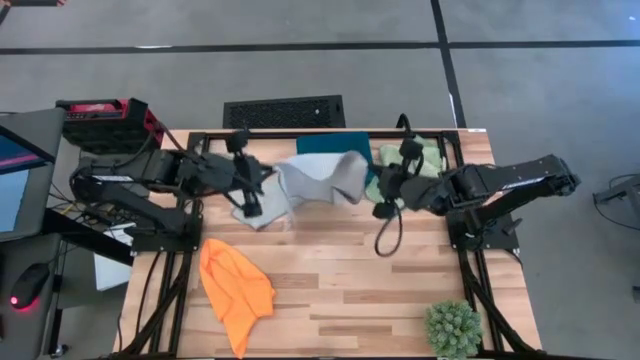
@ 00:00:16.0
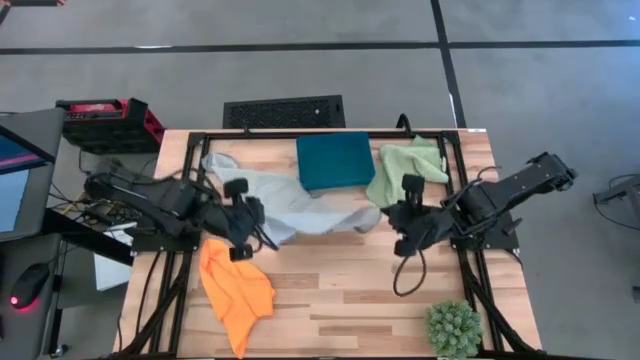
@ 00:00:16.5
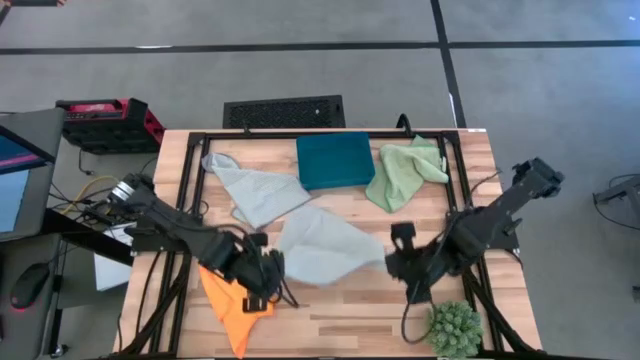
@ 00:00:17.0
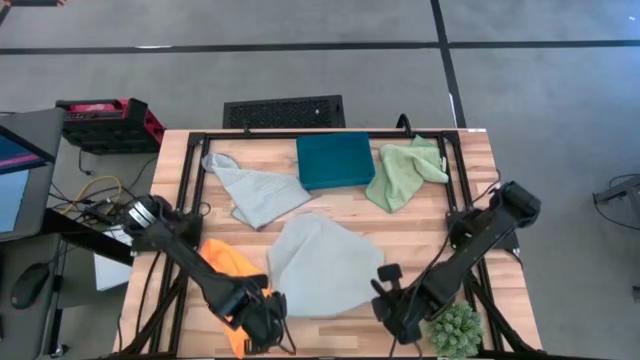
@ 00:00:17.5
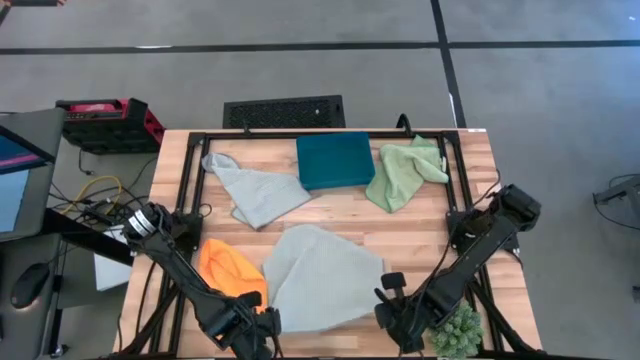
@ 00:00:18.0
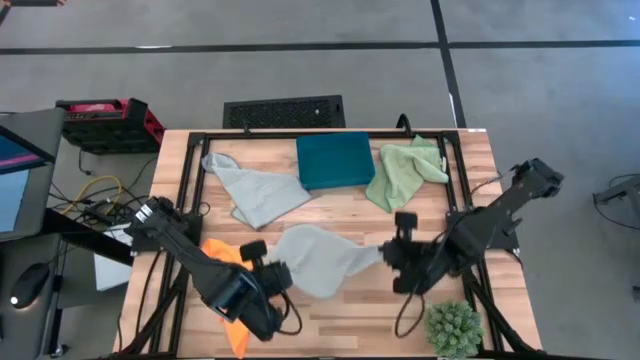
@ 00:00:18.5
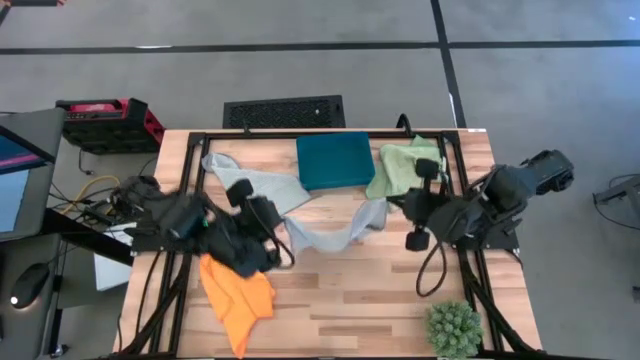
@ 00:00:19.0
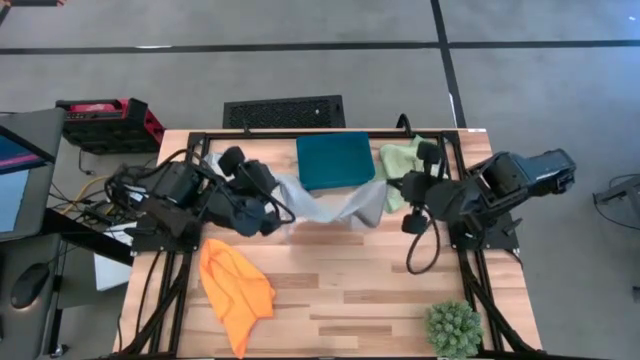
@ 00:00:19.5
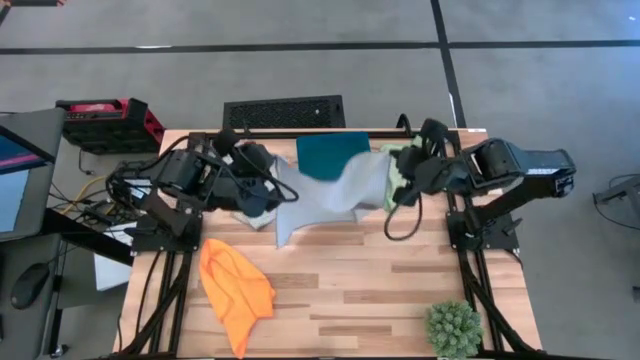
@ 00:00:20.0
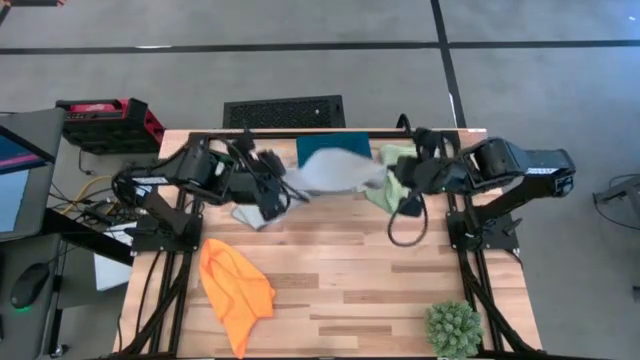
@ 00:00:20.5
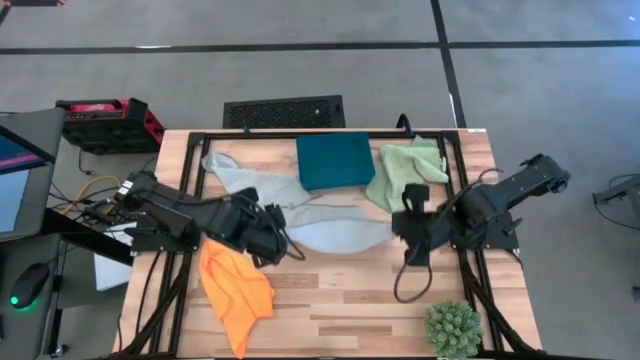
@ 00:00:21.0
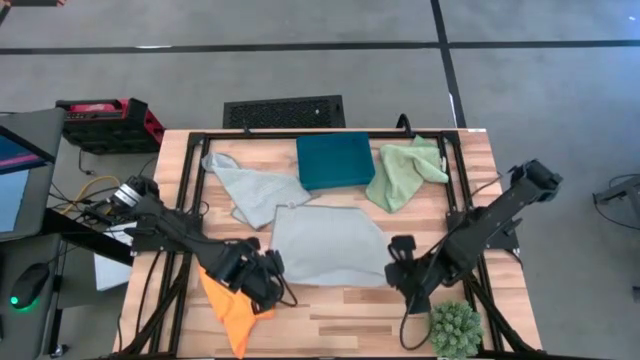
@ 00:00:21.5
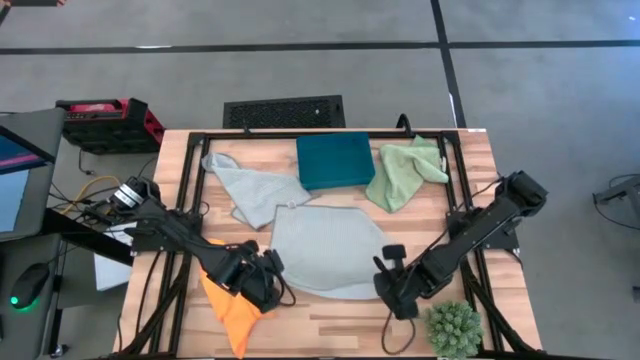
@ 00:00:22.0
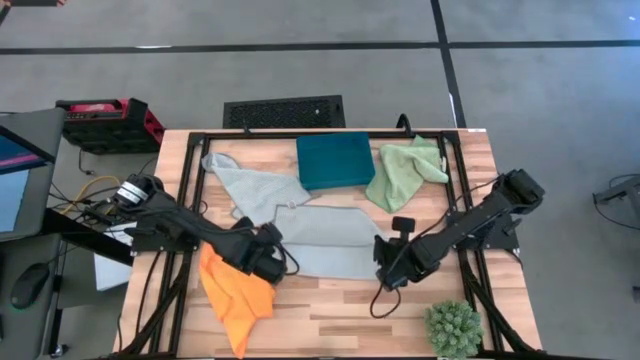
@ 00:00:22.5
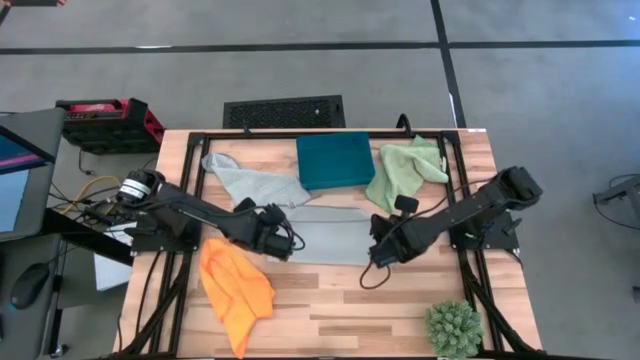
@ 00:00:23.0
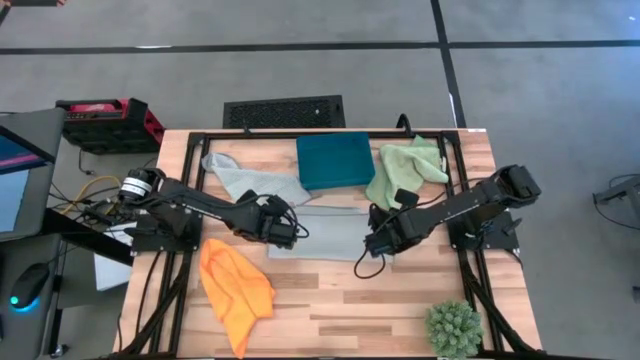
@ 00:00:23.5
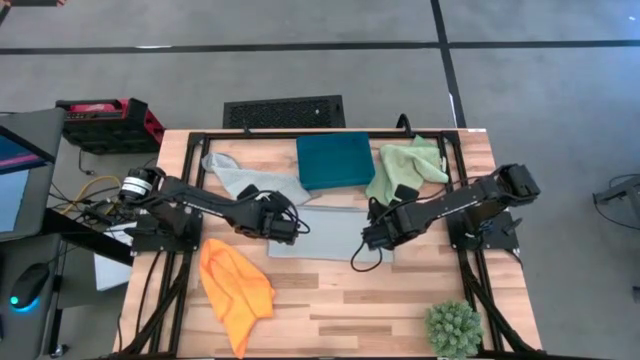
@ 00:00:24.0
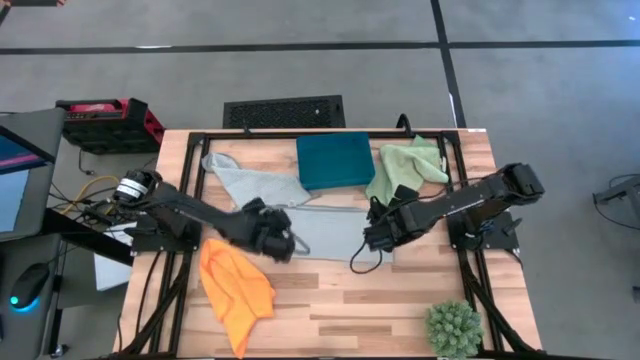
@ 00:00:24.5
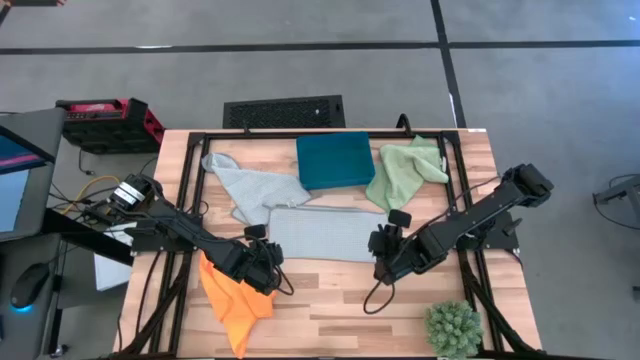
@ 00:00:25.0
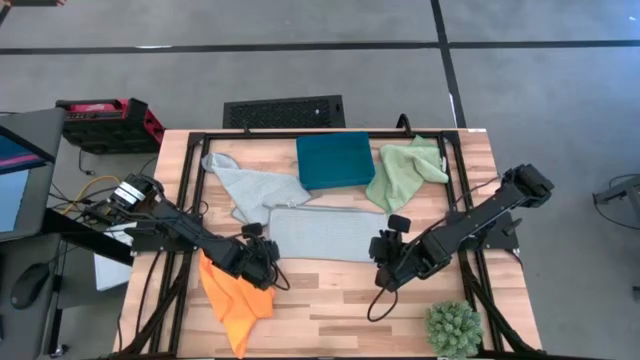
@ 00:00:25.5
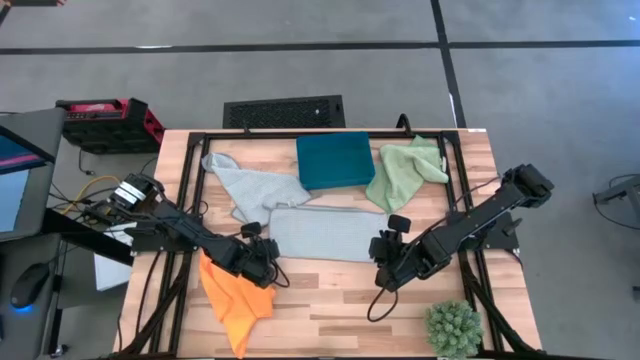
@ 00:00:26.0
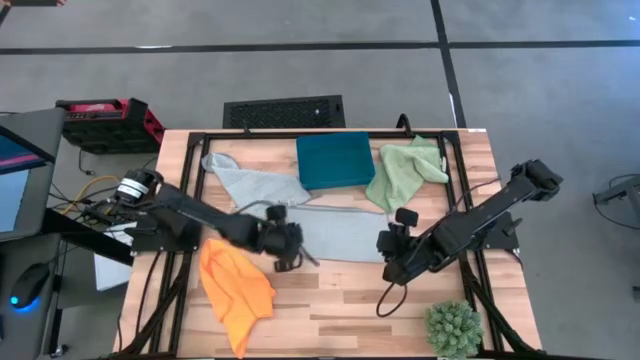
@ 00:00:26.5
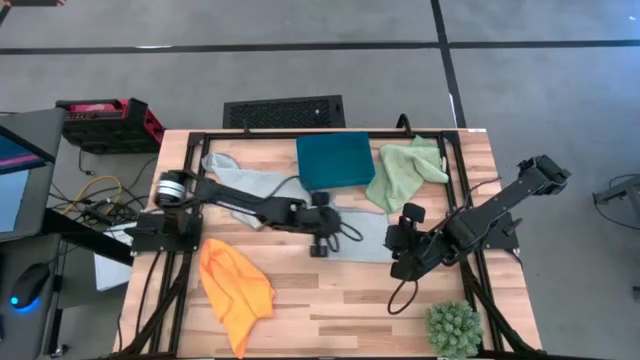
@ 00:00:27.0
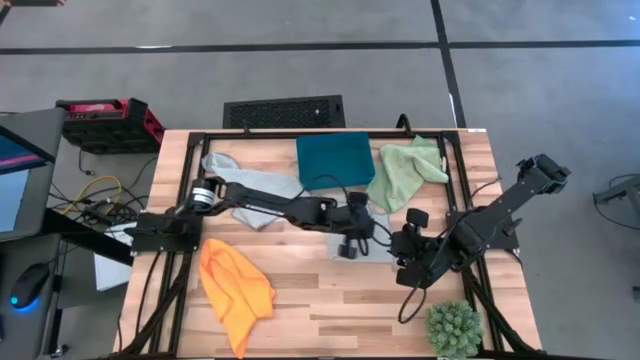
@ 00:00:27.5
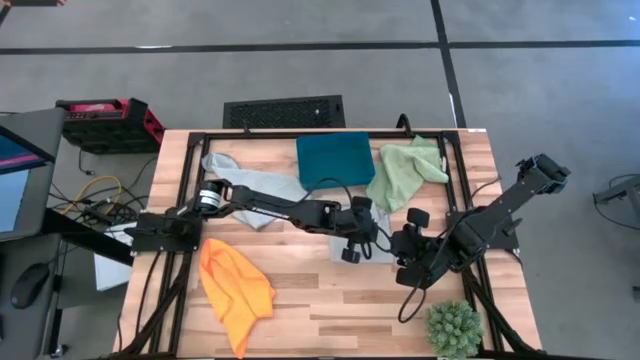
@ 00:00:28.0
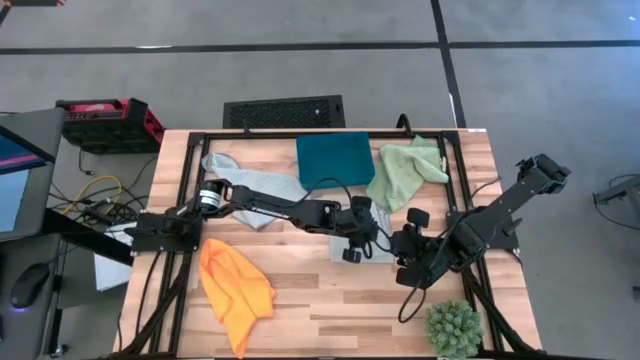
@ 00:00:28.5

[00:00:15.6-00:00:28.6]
Task: Fold microfiber towels
Fold the bottom left gray microfiber cloth

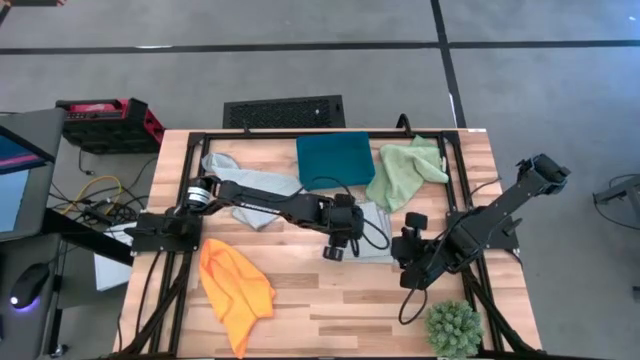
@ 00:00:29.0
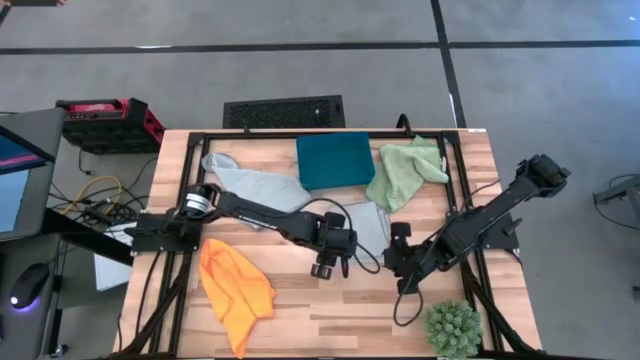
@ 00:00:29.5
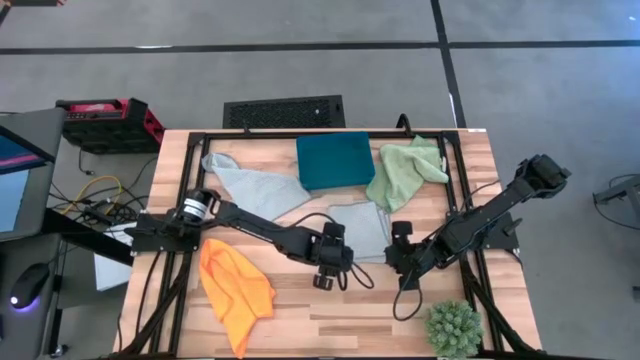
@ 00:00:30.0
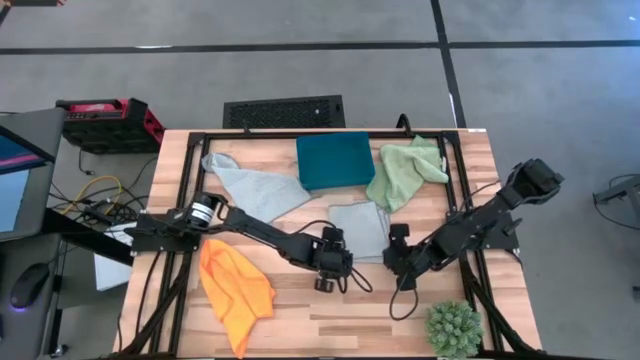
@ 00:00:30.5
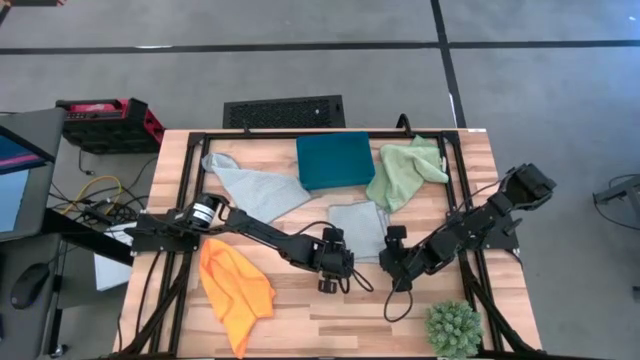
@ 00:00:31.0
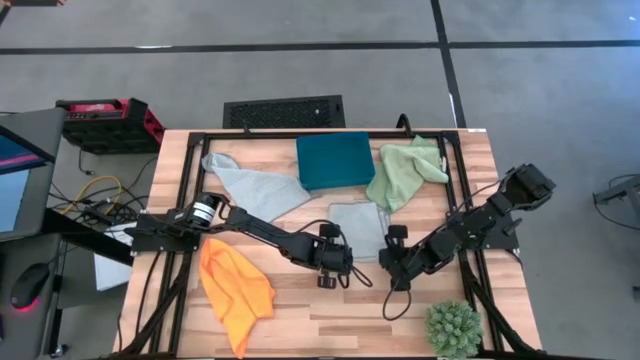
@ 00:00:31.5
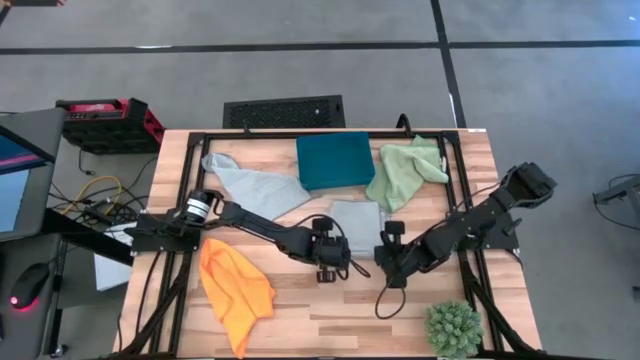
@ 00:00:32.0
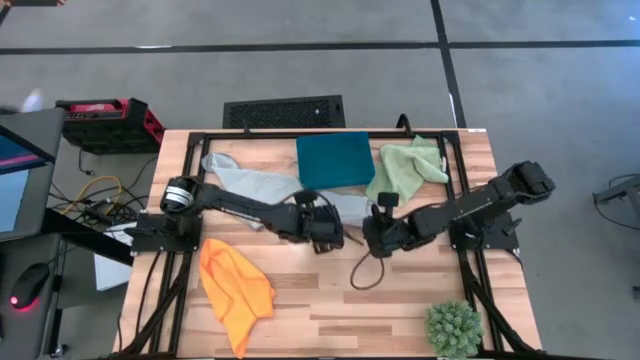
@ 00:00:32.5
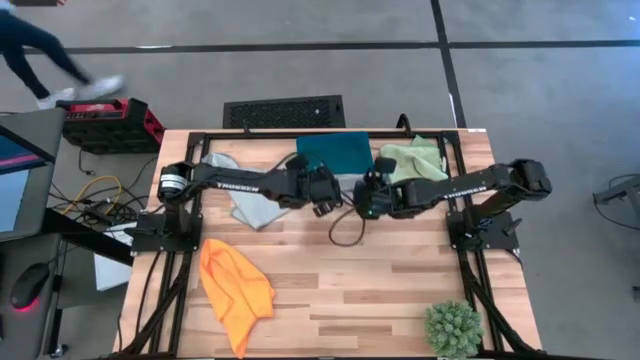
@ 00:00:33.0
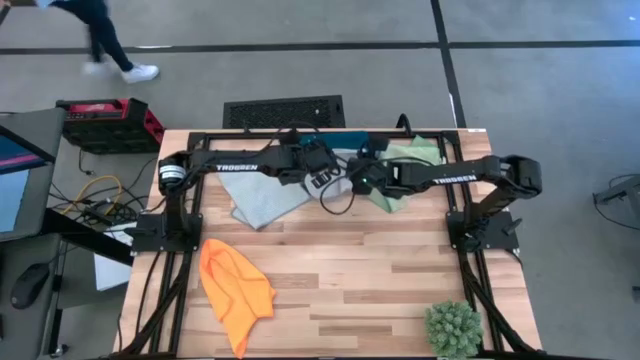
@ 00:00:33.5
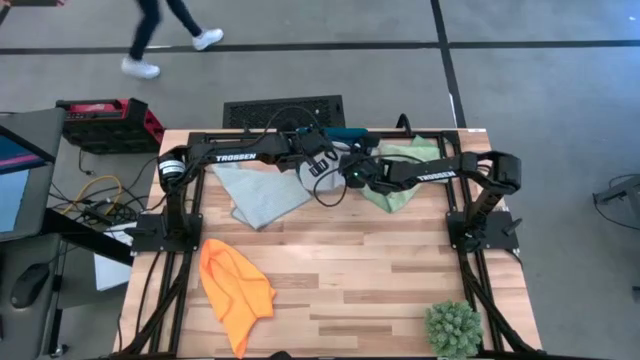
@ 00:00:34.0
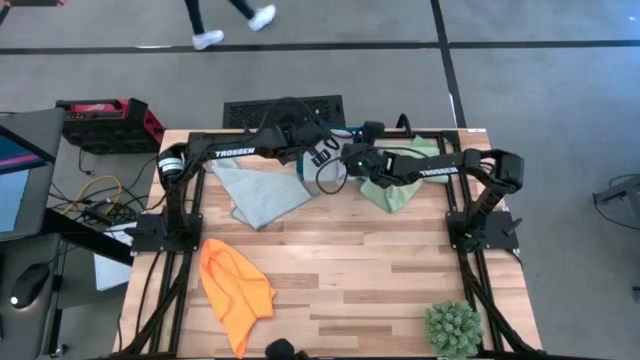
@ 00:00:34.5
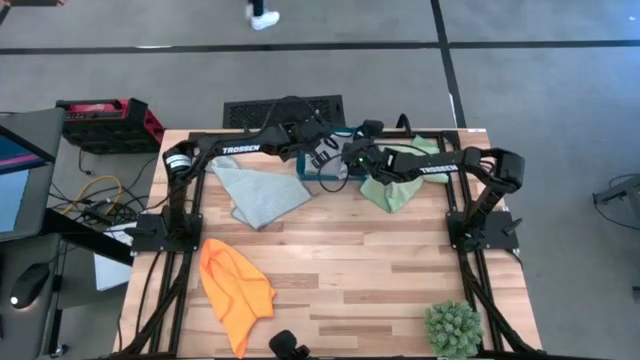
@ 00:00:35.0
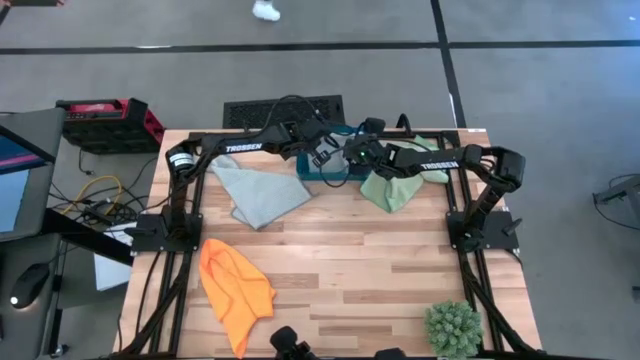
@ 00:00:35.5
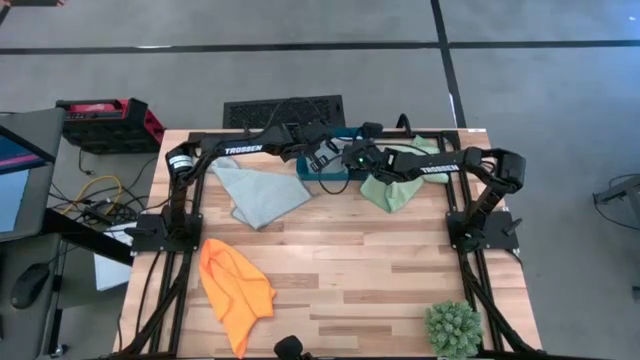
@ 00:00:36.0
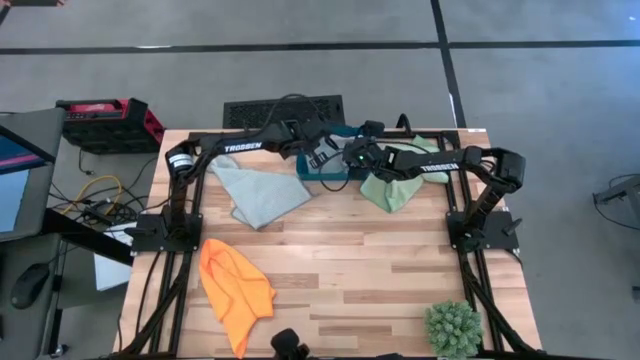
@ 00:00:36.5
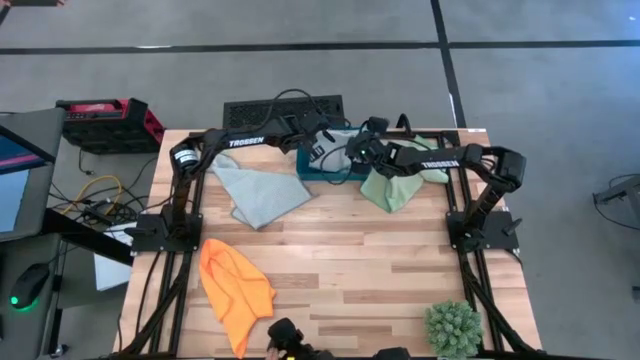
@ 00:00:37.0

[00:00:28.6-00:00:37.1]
Put the folded gray microfiber cloth into the blue bin
